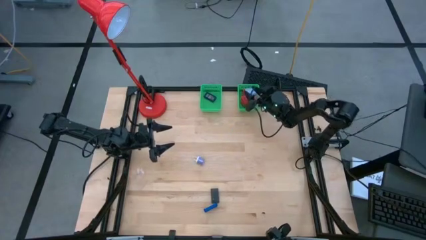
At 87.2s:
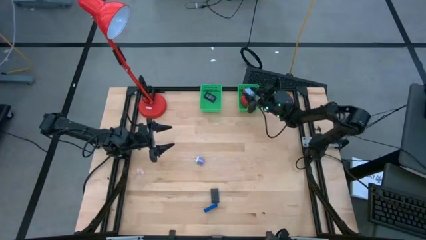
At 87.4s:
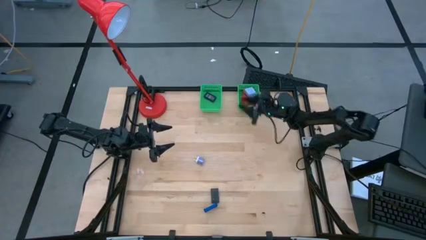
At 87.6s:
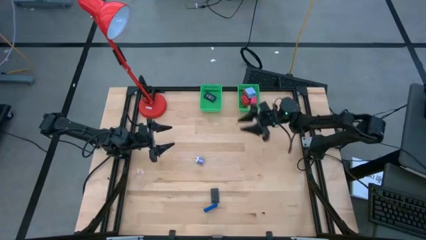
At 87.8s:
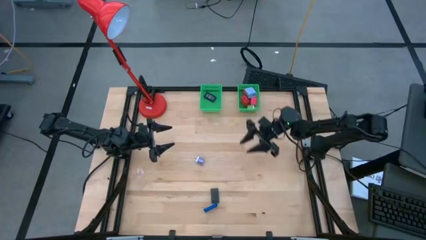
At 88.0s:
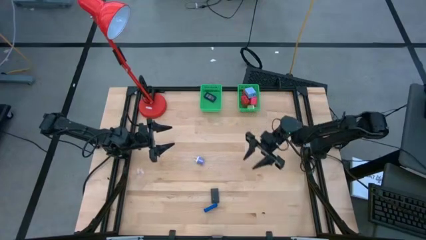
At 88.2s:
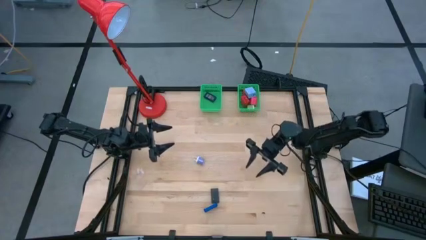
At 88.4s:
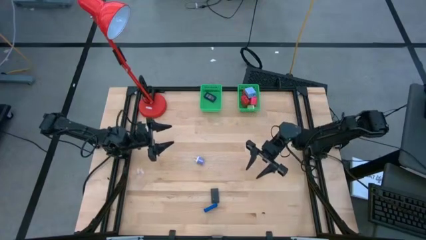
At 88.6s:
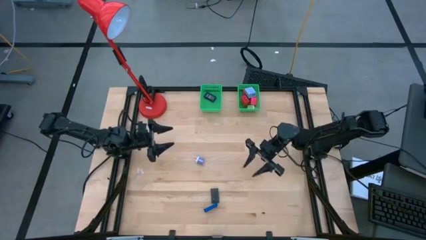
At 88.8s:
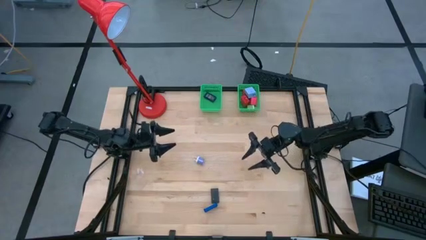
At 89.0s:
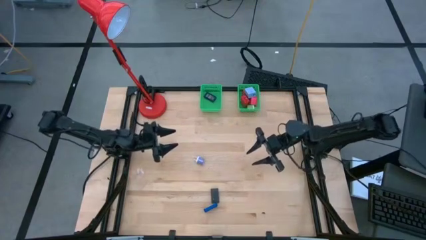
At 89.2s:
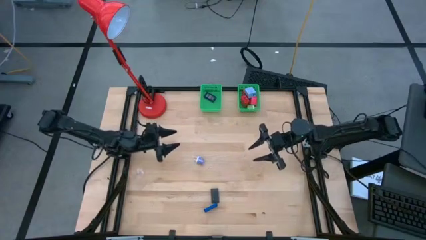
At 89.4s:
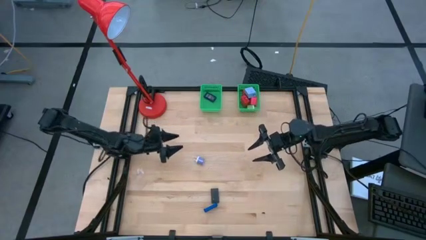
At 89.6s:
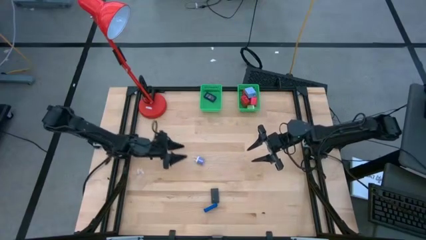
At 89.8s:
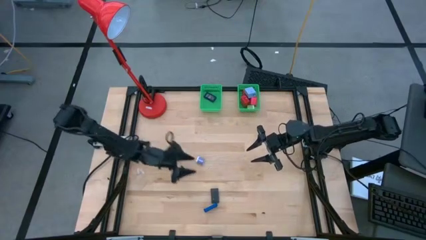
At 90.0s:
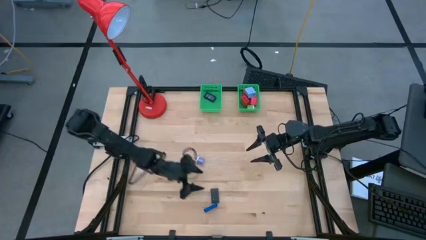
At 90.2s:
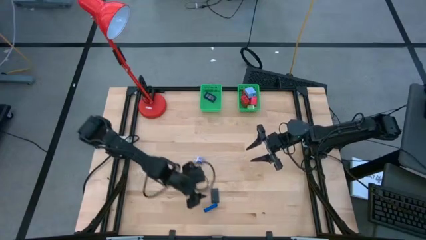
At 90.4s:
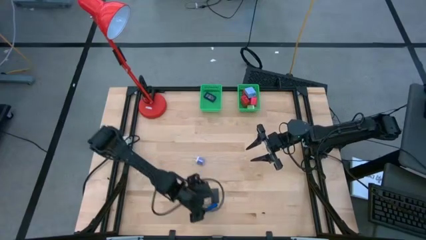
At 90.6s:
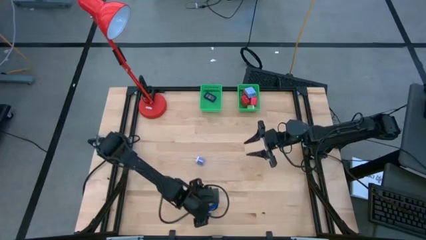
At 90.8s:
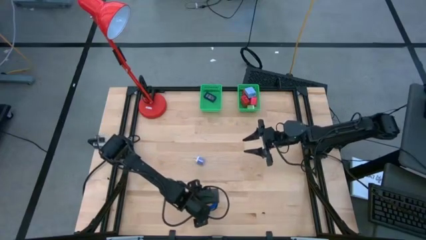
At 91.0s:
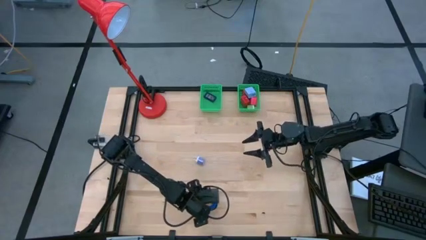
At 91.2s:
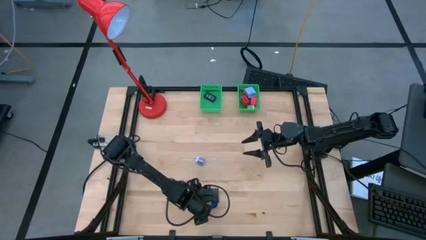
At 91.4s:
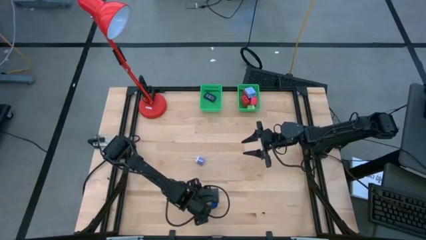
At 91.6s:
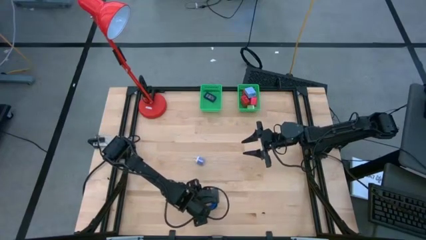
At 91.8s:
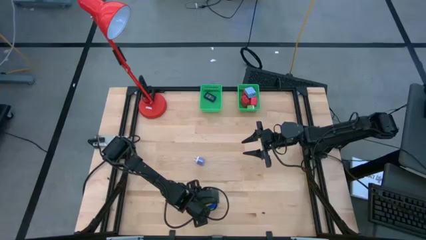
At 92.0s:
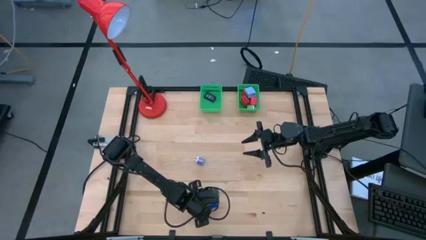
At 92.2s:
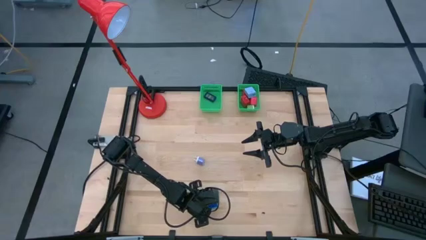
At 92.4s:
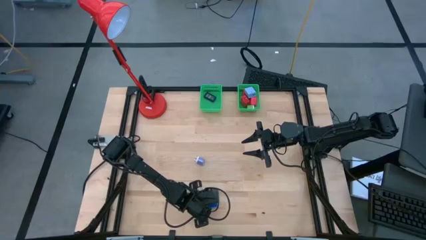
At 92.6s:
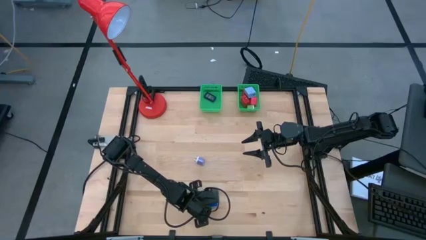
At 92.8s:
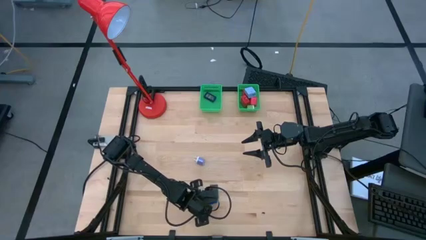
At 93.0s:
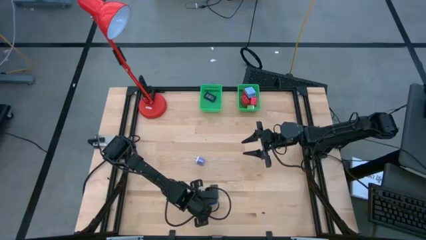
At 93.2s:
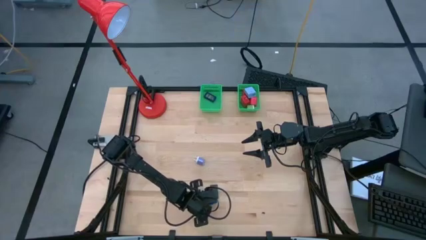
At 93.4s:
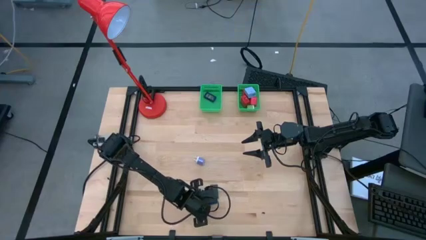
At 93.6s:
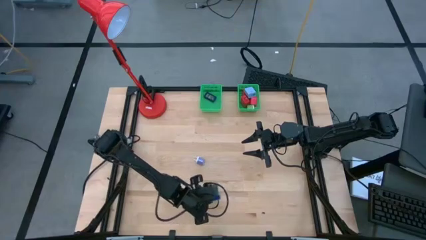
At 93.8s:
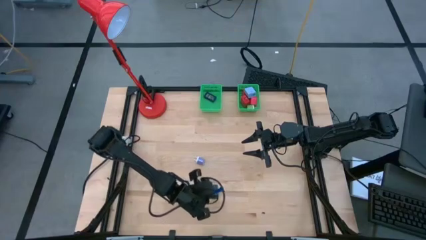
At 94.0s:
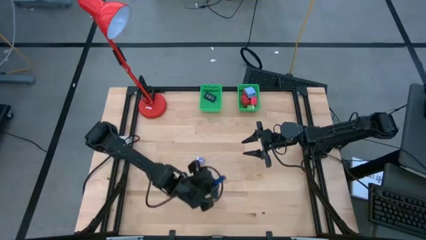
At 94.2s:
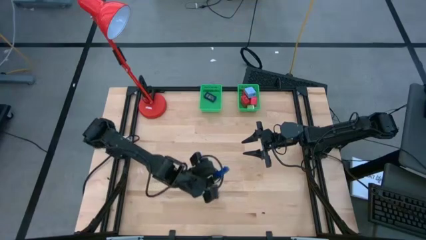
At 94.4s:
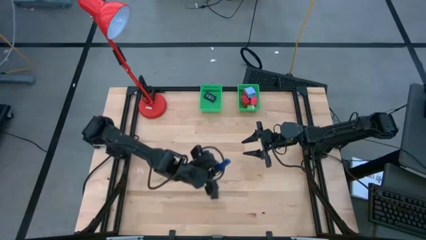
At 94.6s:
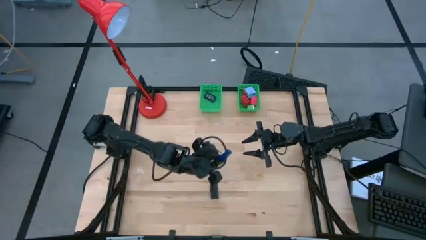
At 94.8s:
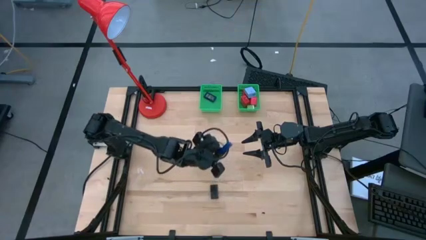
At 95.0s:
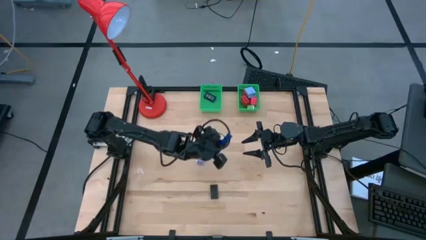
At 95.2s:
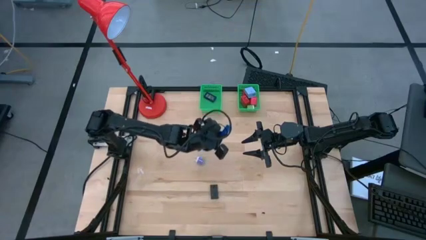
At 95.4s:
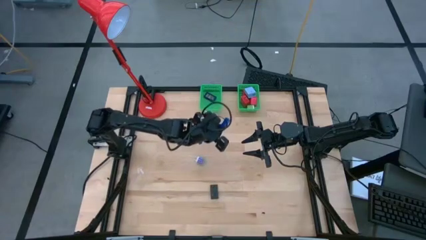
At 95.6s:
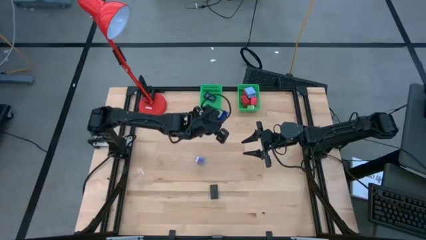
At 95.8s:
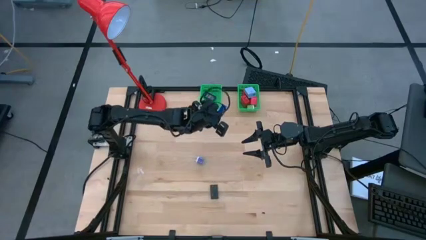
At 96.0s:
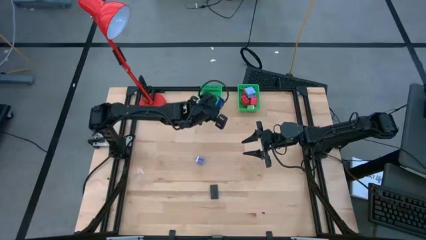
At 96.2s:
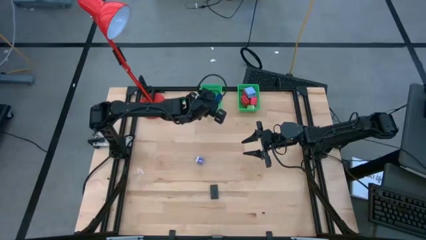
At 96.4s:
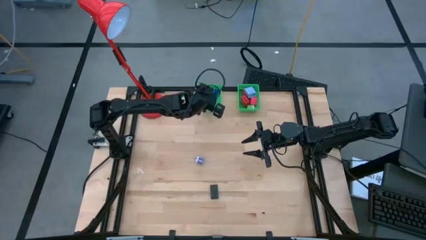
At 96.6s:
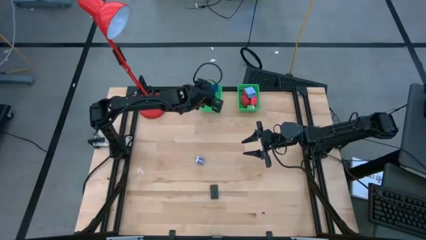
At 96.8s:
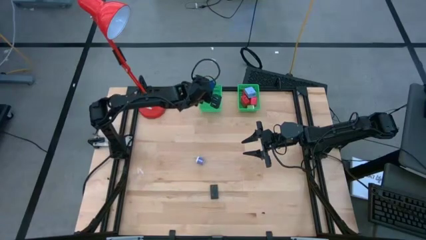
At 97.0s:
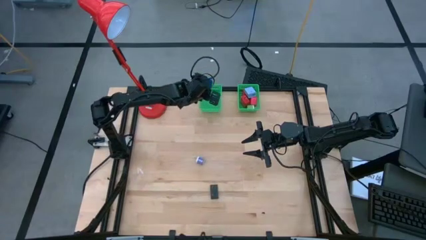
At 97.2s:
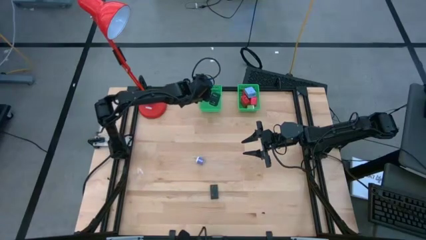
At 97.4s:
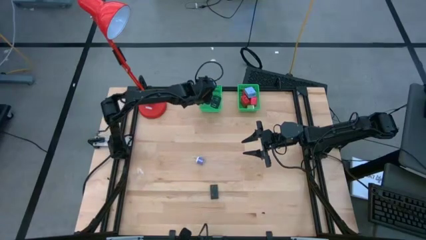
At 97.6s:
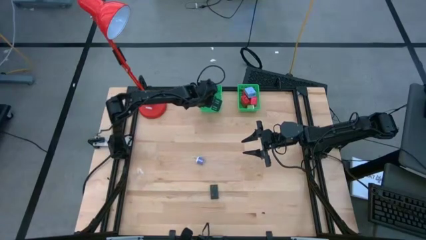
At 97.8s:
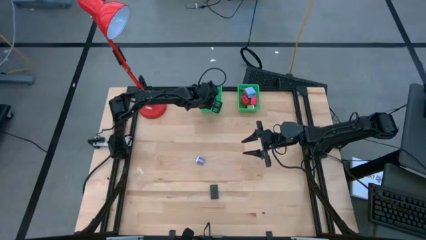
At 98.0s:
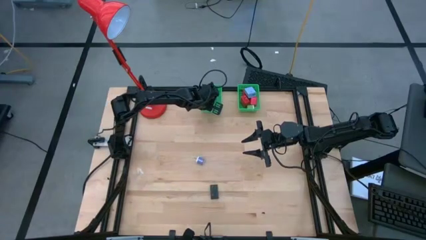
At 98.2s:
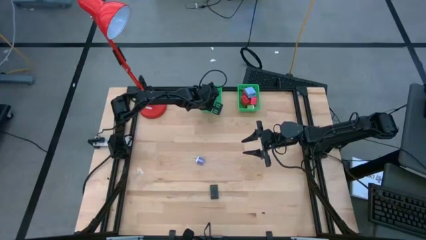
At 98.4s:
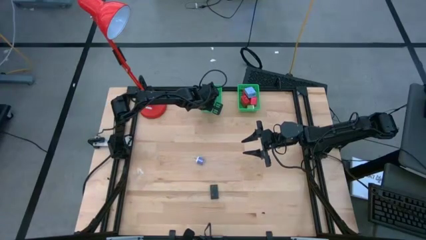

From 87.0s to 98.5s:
Task: Pick & Place Office items
Put the blue digital timer into the left green basket

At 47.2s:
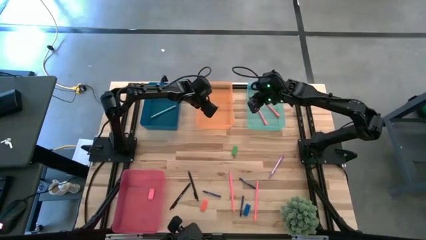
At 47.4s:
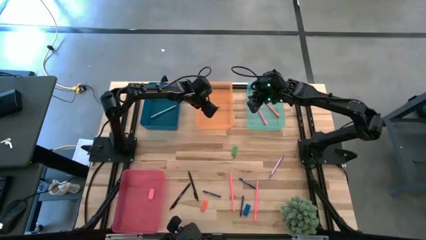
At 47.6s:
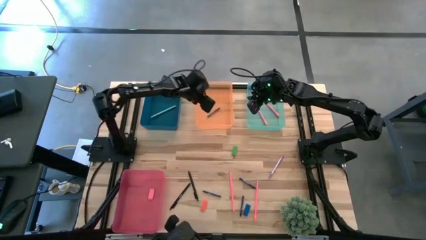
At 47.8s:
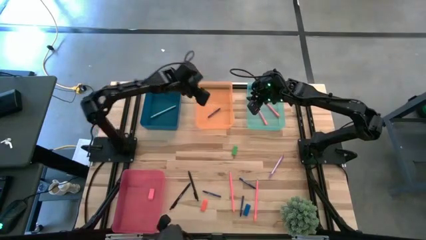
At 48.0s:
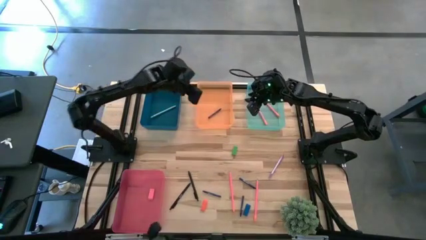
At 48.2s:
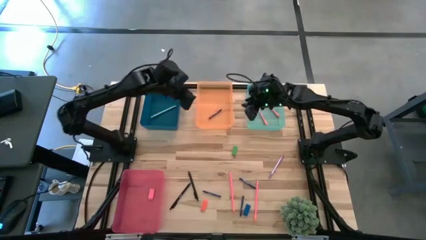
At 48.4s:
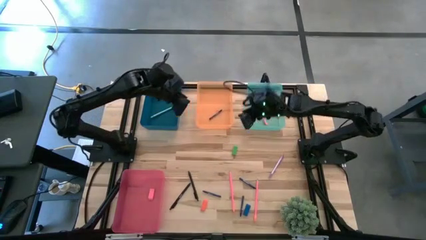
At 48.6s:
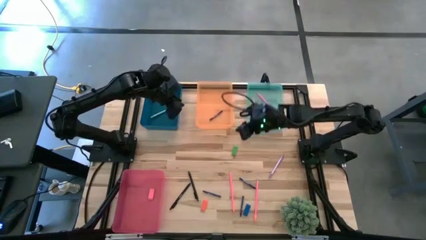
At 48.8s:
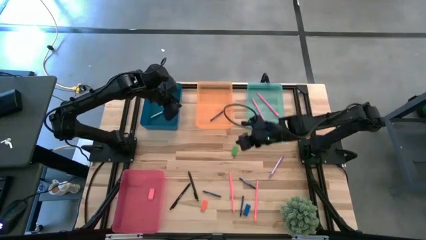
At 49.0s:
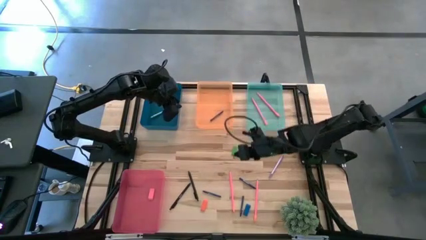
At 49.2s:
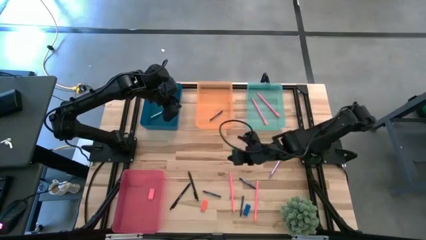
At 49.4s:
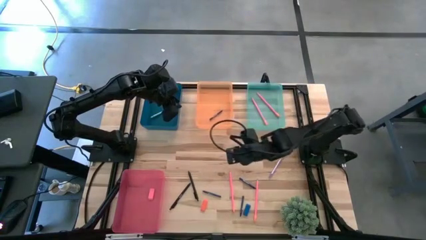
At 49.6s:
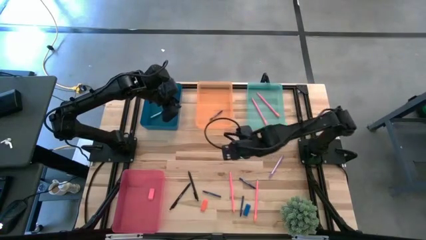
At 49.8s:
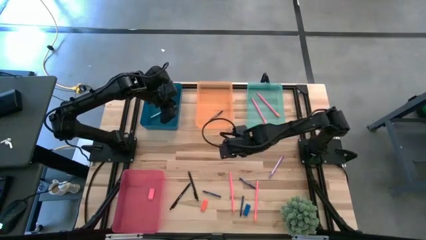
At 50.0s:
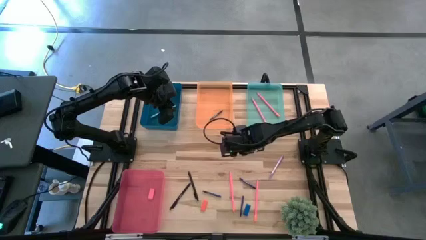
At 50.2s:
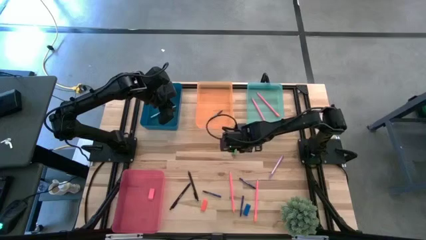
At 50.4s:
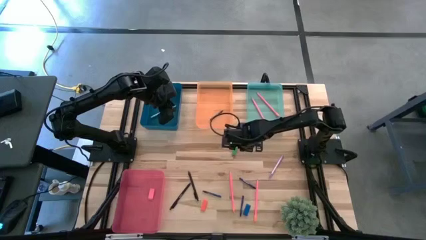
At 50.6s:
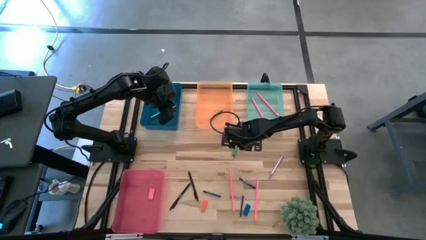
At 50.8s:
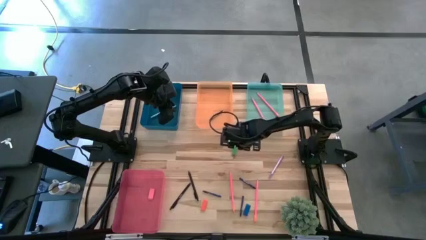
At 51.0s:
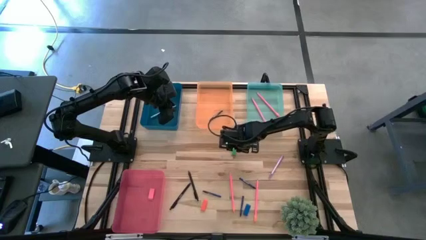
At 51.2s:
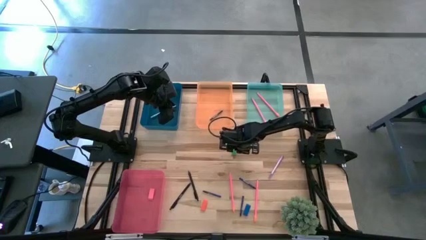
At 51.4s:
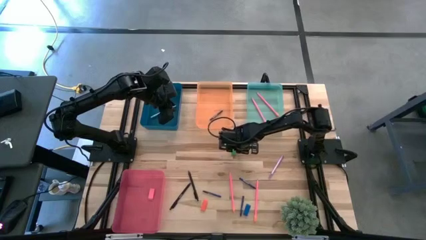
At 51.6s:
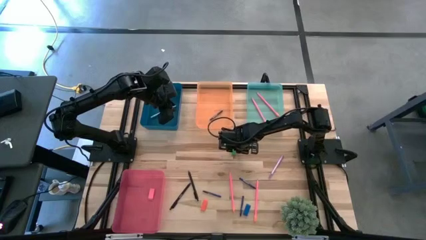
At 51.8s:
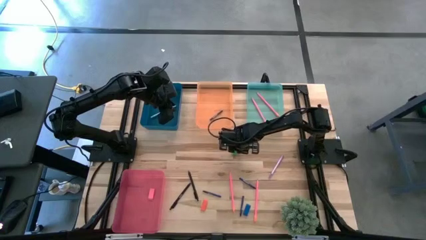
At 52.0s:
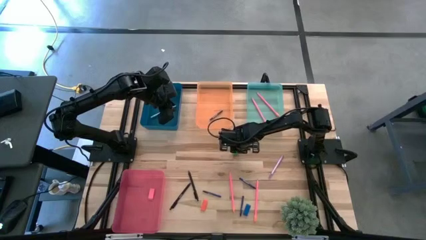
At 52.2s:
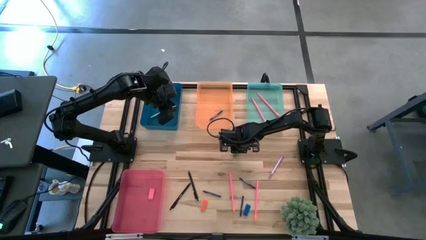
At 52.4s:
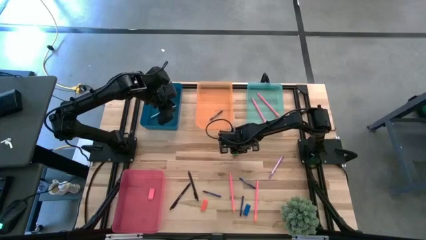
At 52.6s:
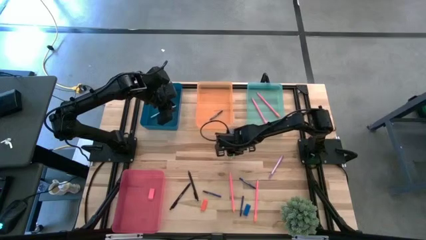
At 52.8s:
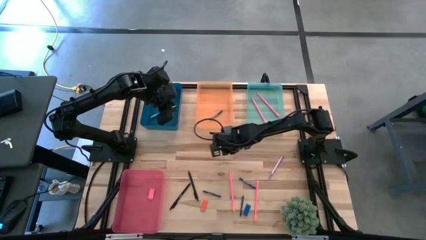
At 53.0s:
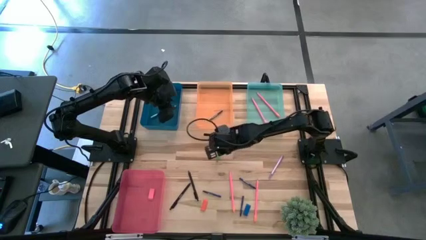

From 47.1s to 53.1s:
Task: Sort crayons/erasers/pens/pencils in bins
Put the green eraser into the pink bin
